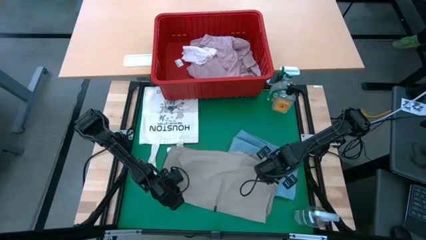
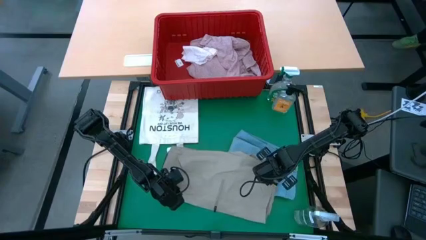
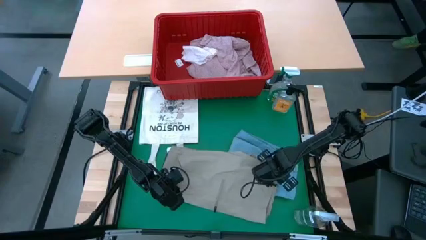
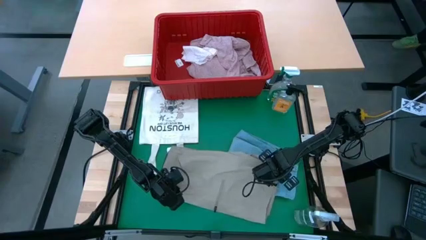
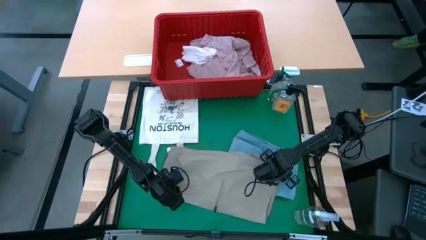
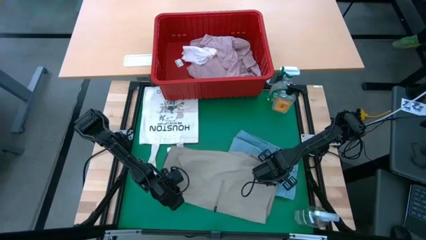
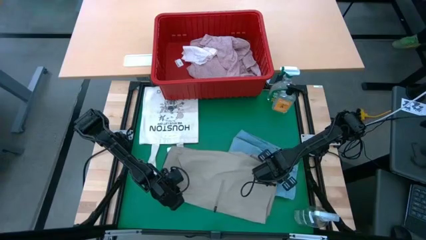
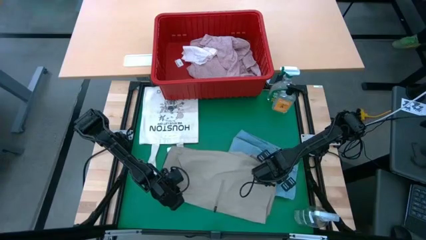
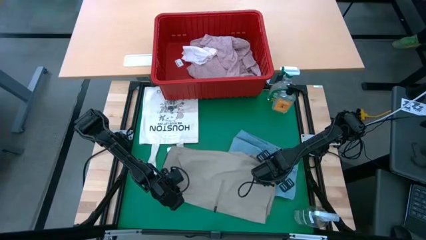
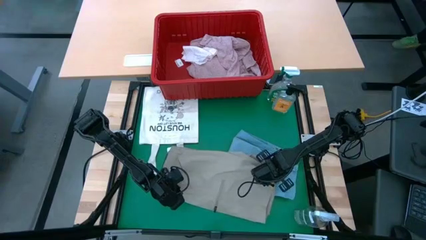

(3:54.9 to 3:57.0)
Task: Fold laundry
Fold the gray short

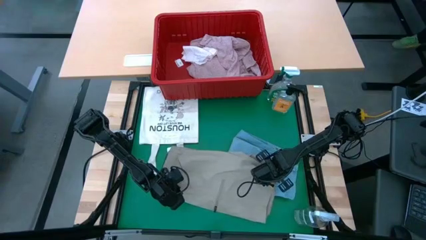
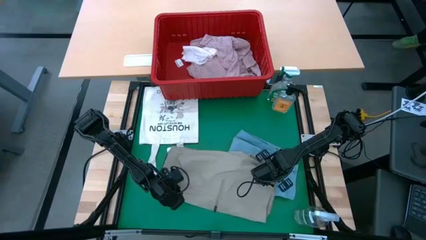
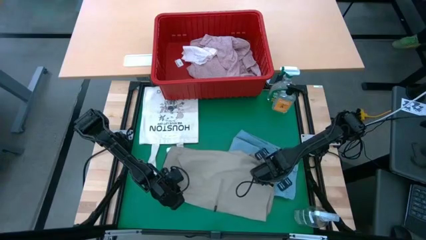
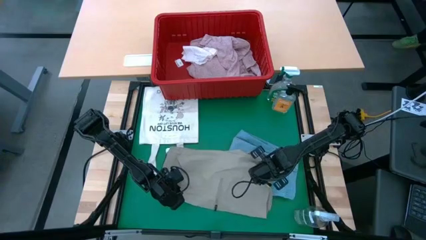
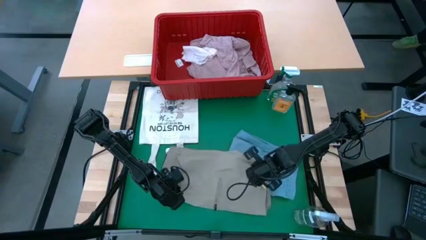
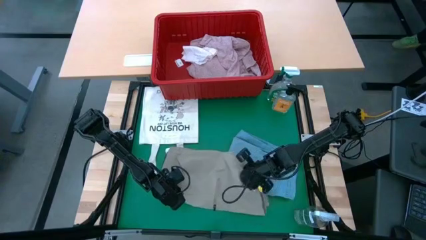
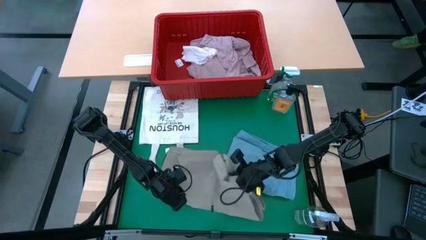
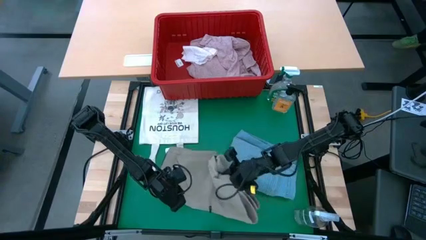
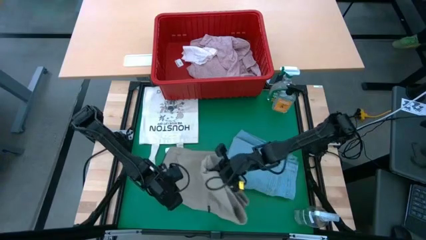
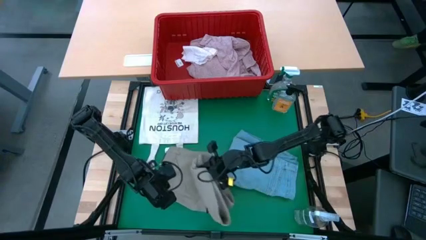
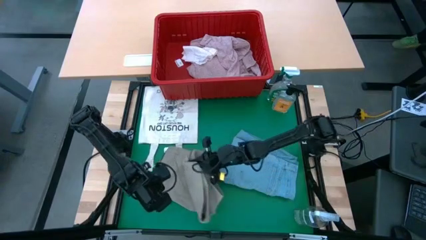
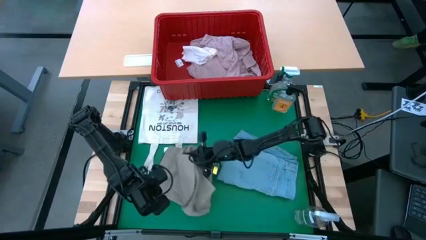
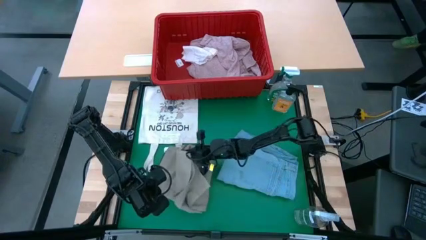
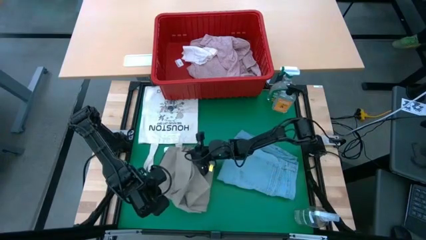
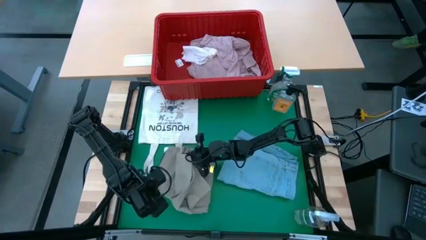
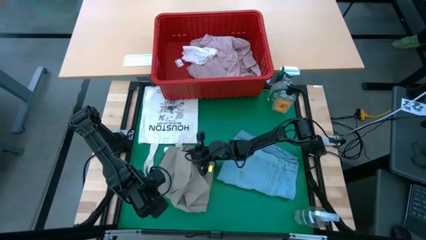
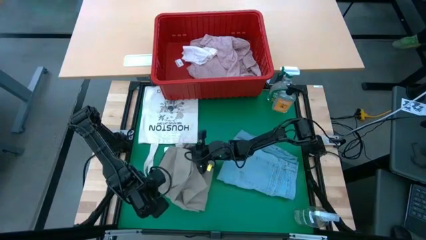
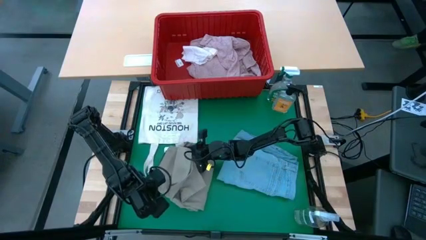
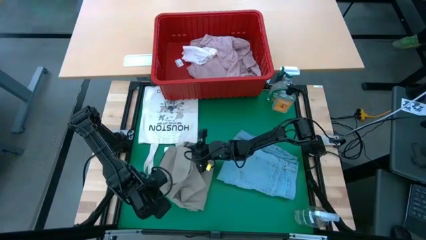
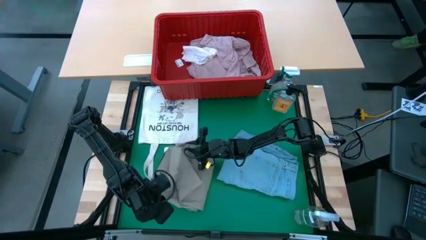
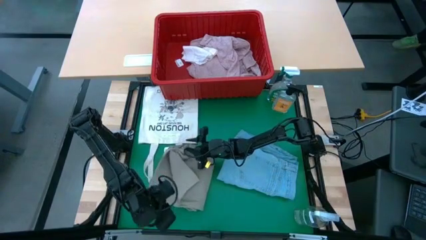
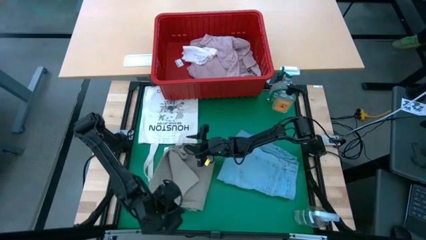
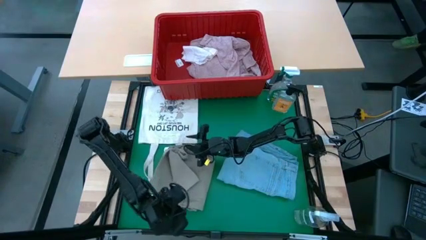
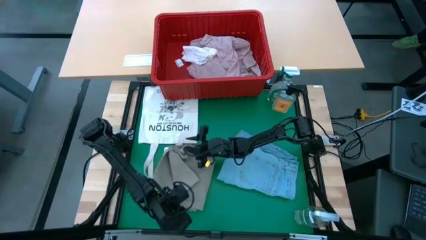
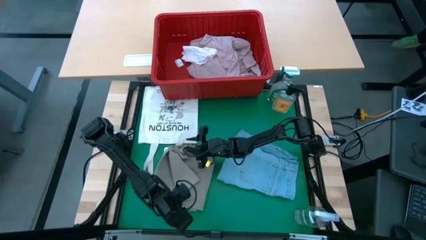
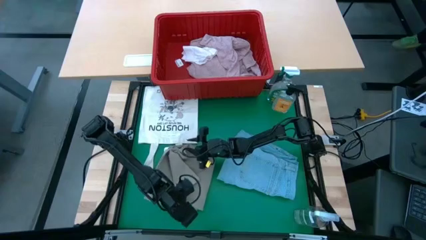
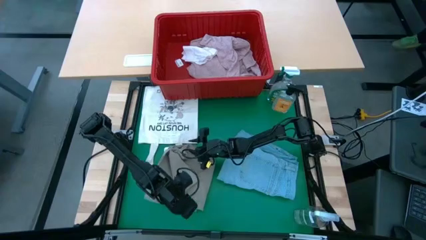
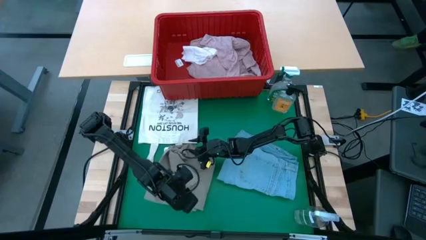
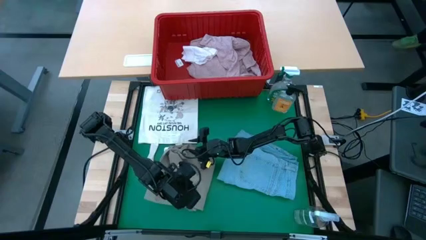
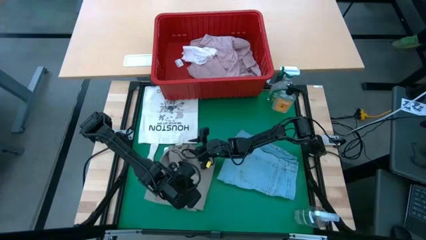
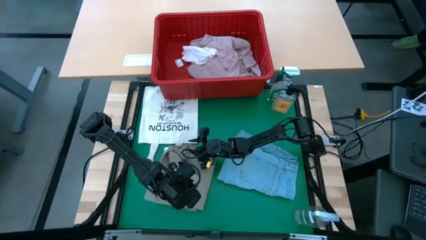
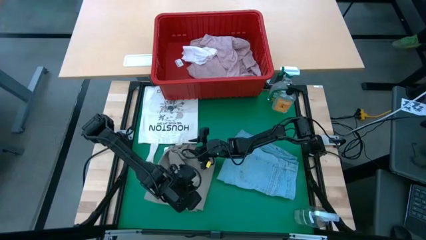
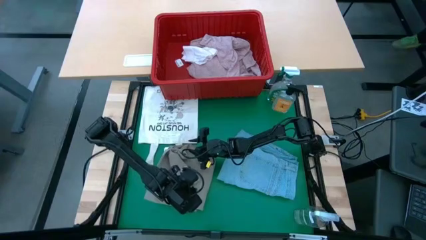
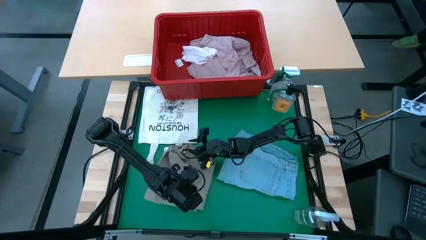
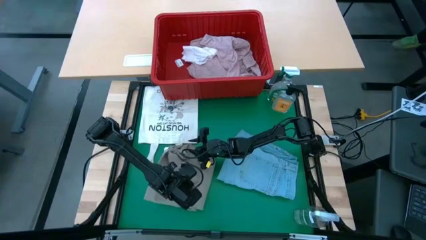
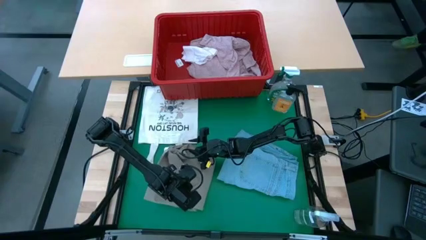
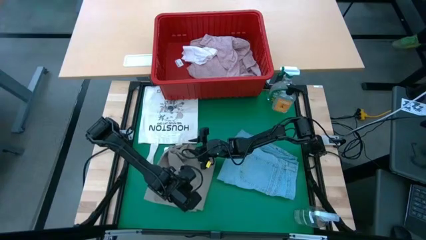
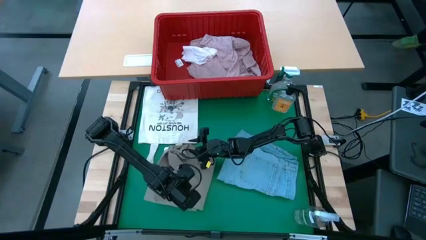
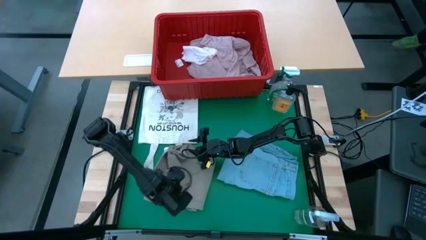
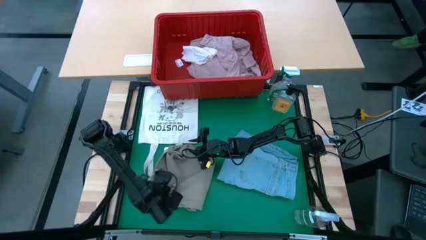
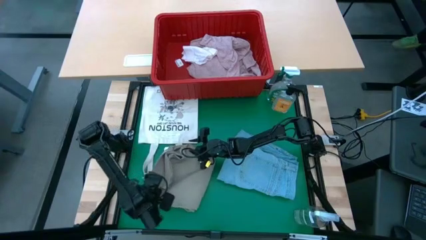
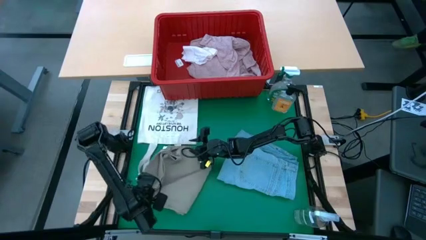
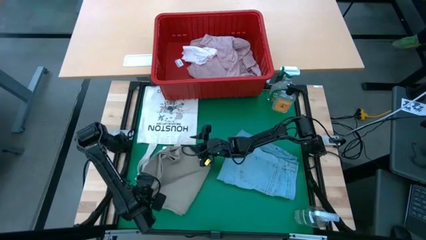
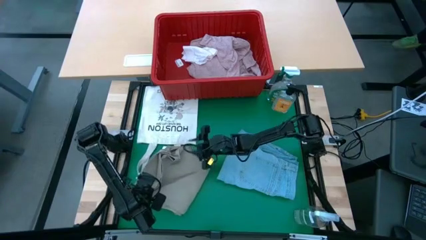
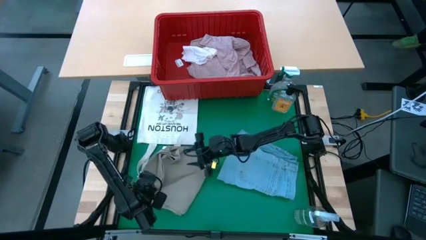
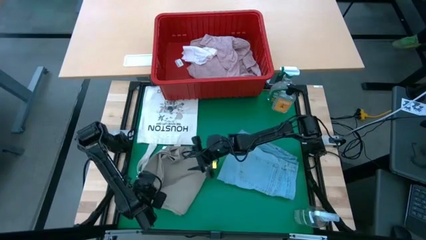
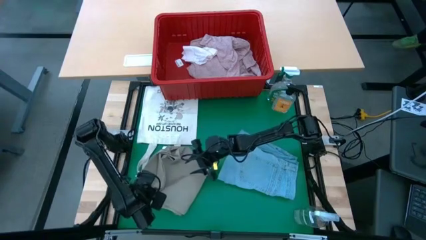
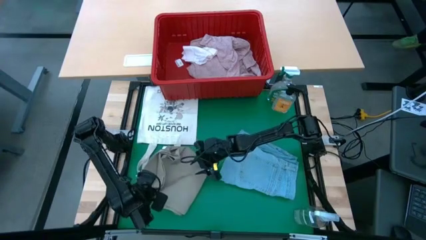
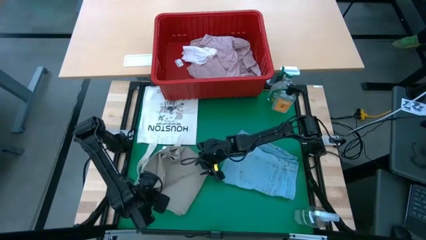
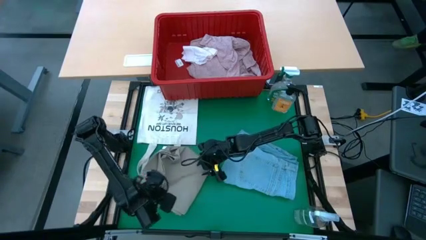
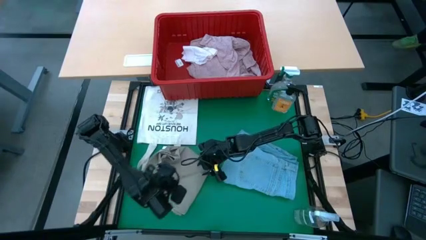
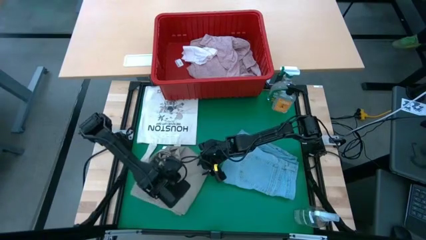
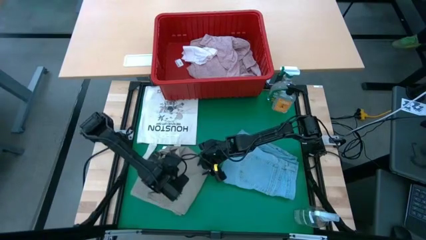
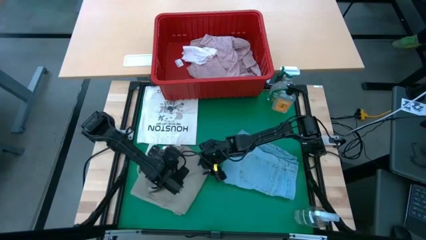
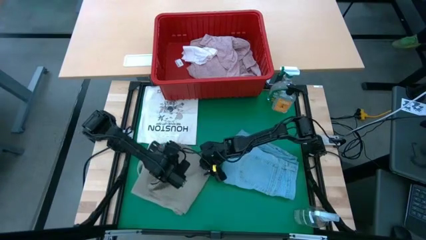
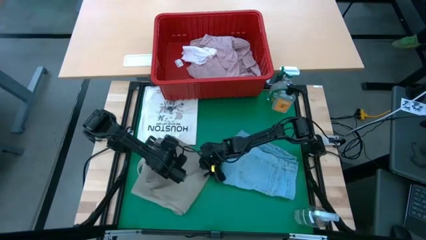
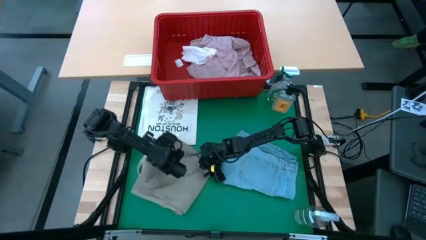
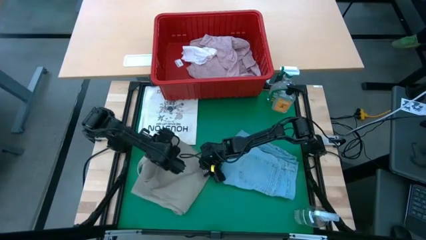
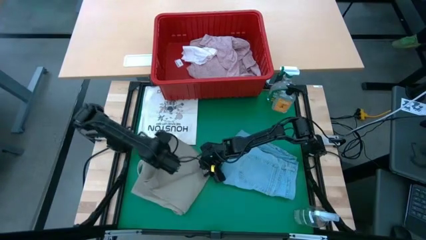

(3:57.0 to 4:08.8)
Fold the gray short
